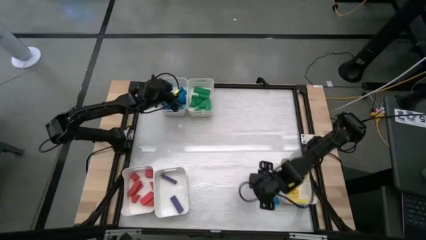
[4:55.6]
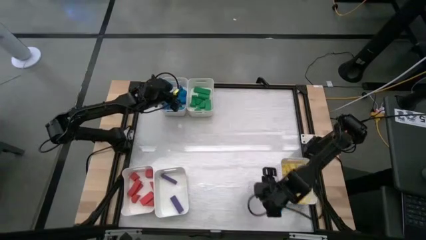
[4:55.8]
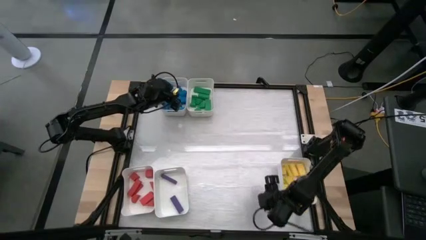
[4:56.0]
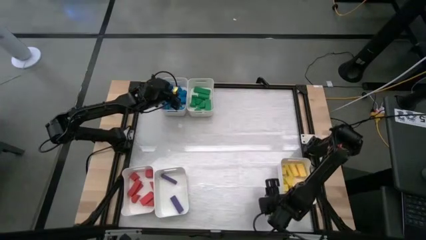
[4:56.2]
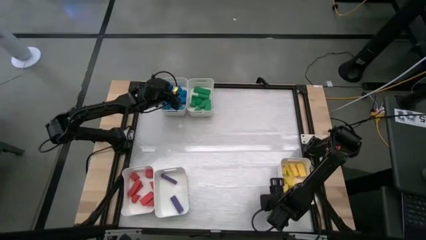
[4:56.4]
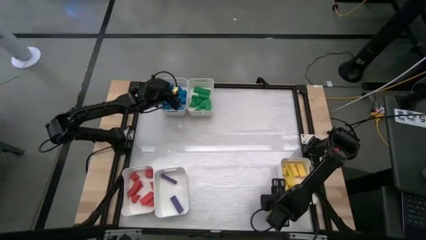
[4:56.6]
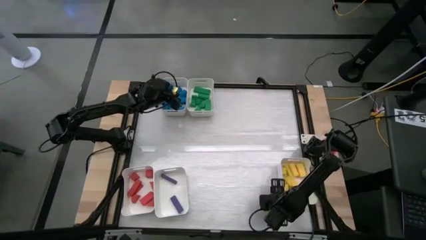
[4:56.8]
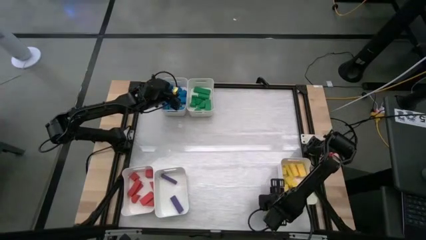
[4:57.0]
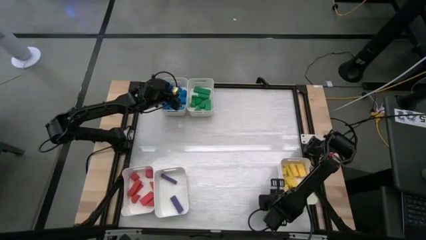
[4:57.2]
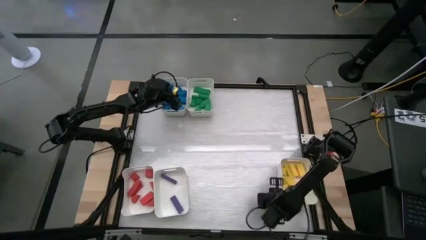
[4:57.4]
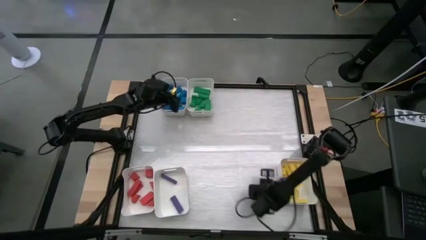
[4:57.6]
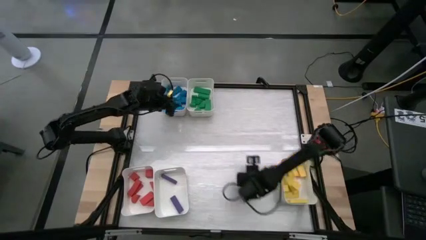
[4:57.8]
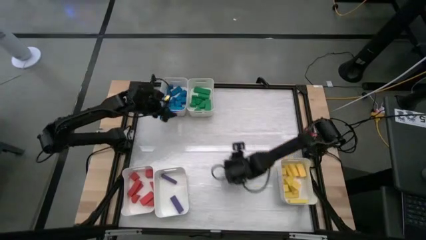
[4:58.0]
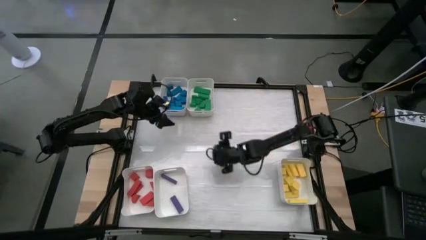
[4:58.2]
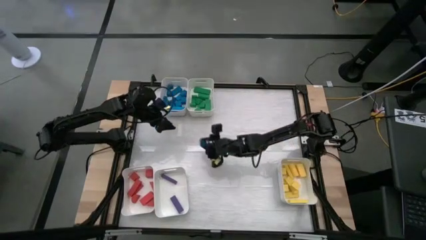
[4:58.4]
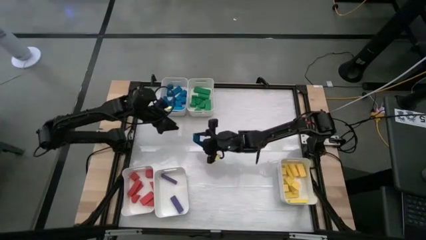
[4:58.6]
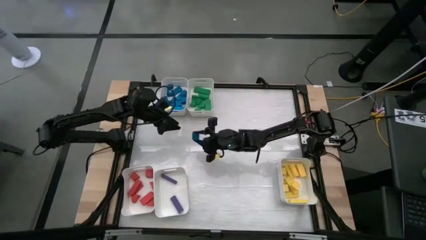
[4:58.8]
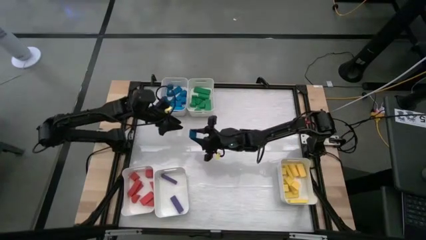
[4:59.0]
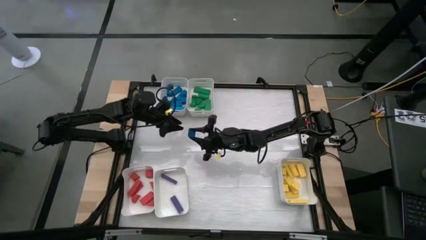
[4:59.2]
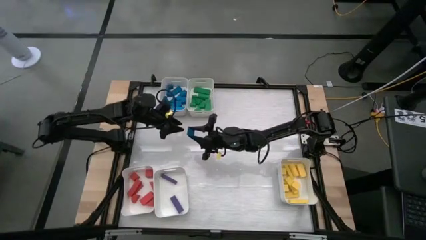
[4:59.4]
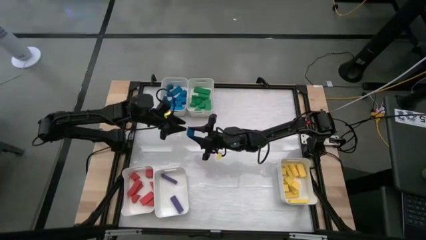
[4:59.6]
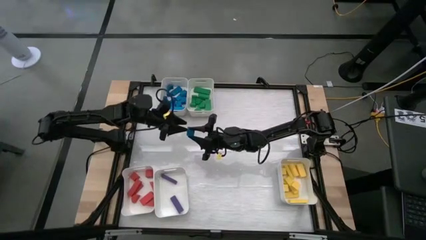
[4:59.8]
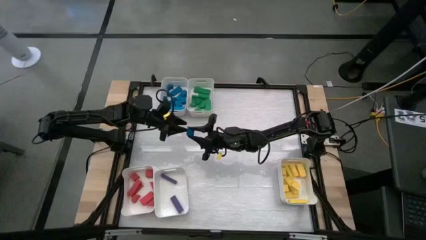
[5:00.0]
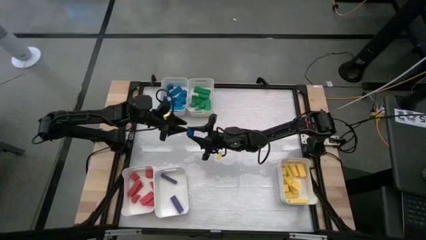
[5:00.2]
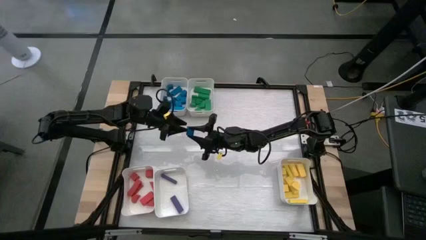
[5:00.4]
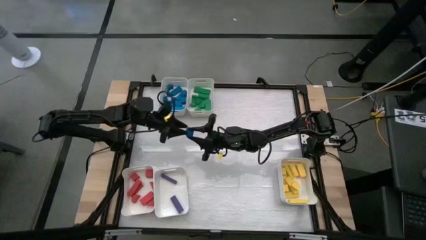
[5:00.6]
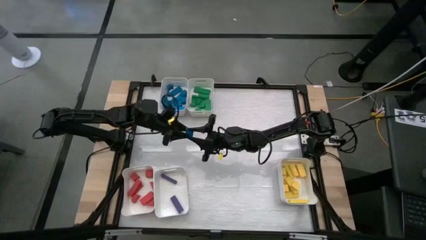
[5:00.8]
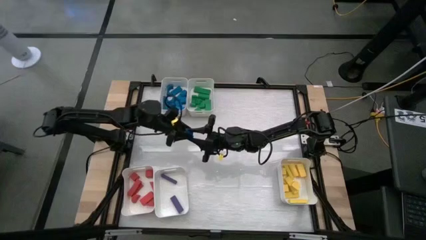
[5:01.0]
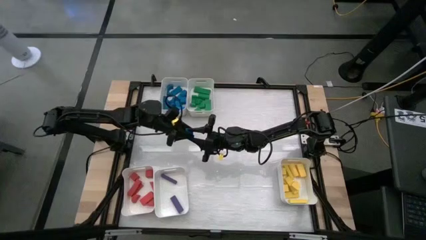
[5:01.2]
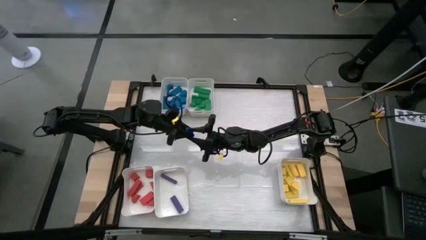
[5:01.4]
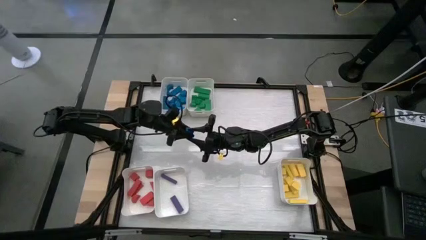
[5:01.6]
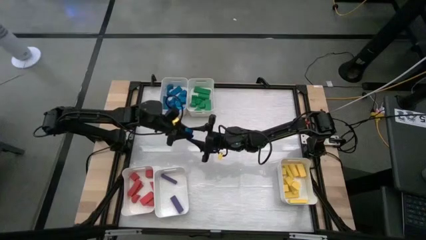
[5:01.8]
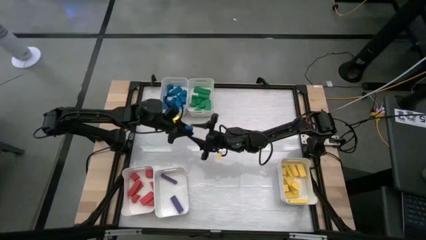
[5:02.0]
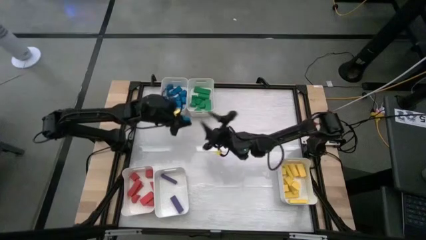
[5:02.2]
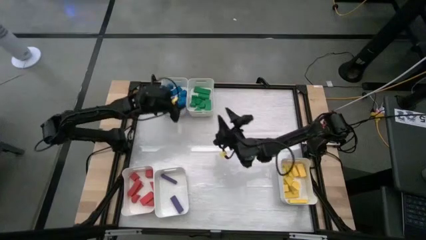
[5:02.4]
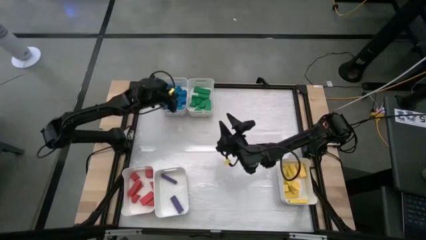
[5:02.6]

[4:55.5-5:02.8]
Task: Sort blocks
Put the blue block into the top left white bin

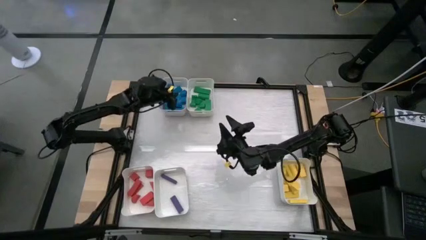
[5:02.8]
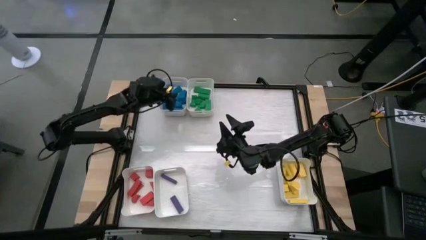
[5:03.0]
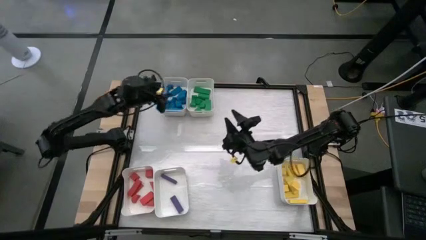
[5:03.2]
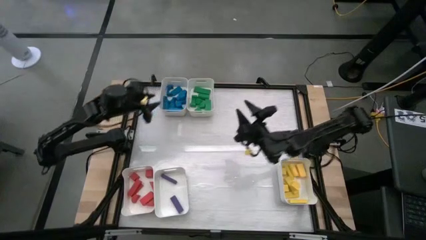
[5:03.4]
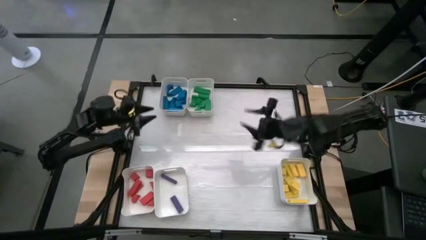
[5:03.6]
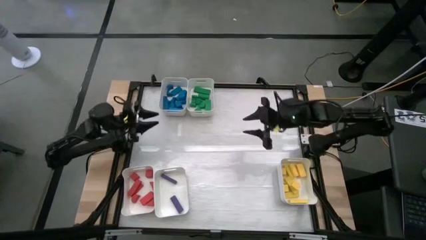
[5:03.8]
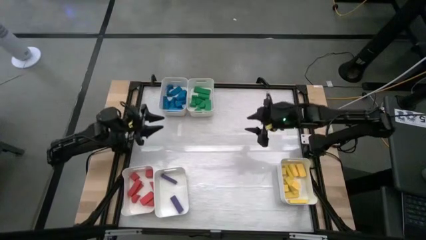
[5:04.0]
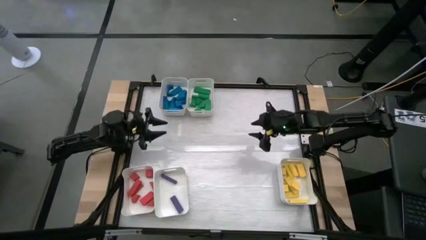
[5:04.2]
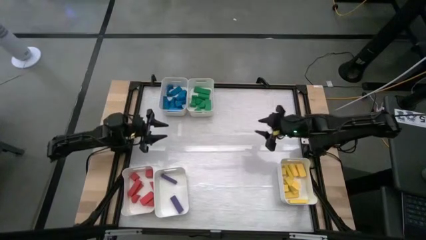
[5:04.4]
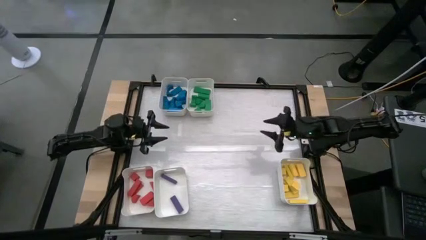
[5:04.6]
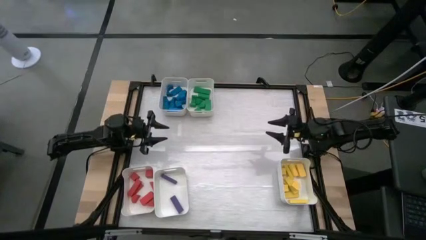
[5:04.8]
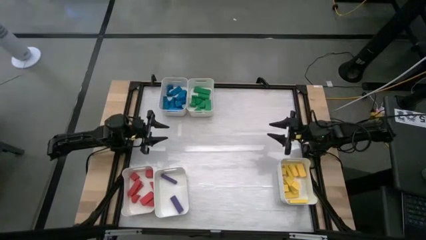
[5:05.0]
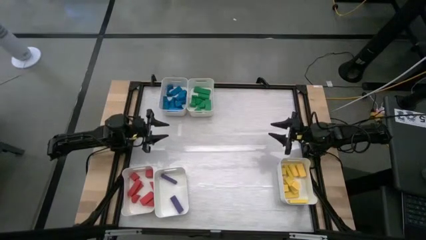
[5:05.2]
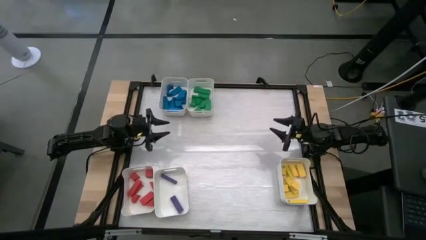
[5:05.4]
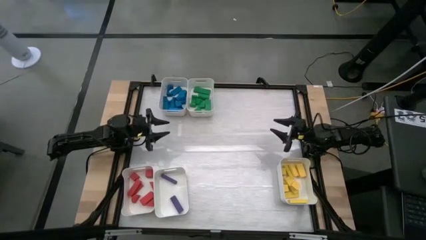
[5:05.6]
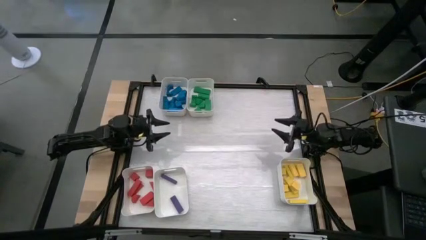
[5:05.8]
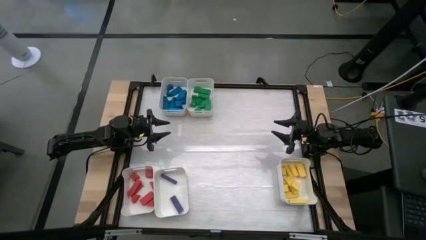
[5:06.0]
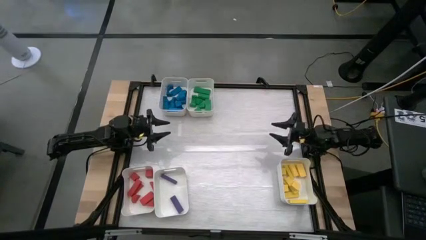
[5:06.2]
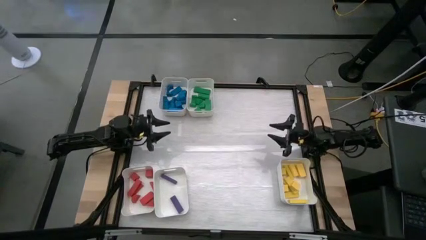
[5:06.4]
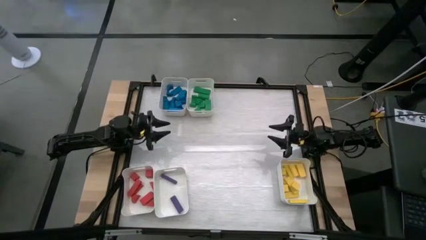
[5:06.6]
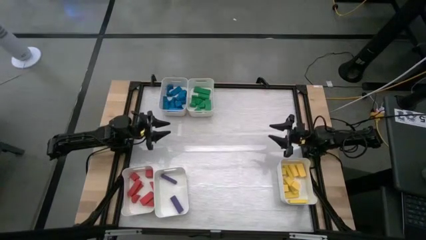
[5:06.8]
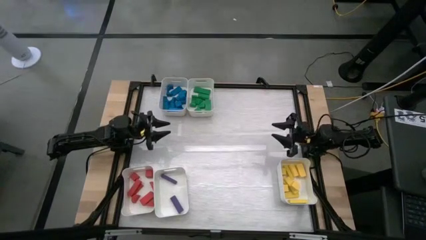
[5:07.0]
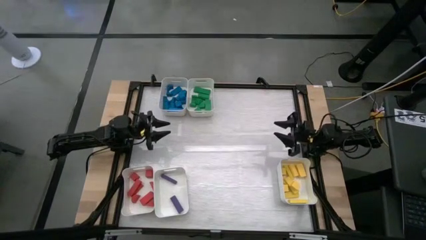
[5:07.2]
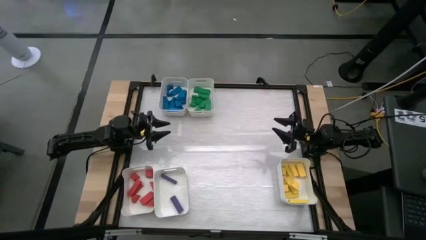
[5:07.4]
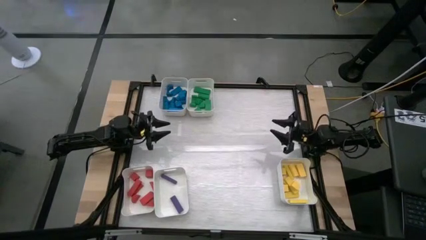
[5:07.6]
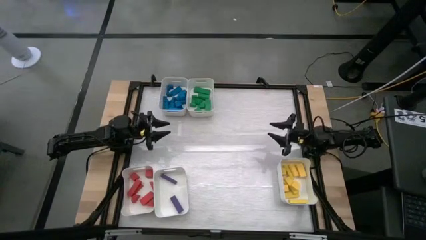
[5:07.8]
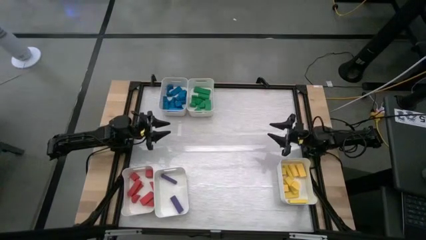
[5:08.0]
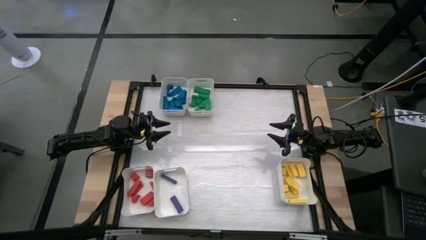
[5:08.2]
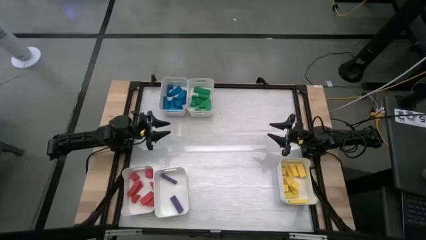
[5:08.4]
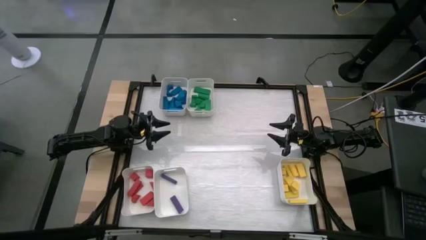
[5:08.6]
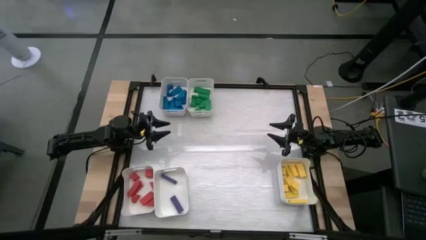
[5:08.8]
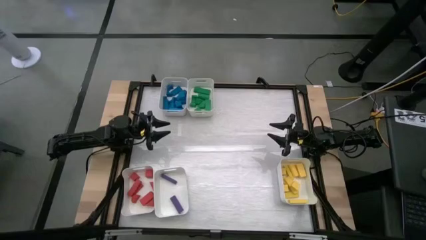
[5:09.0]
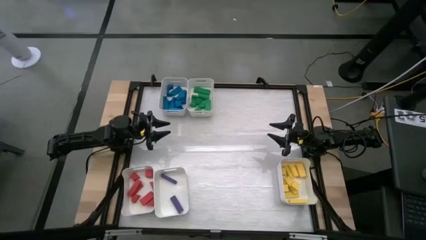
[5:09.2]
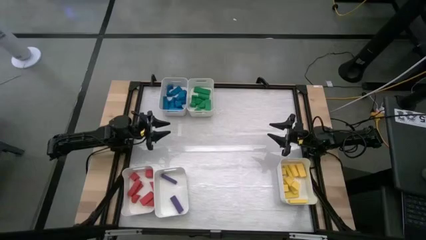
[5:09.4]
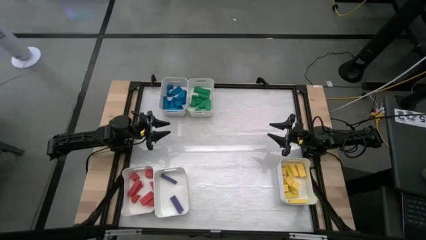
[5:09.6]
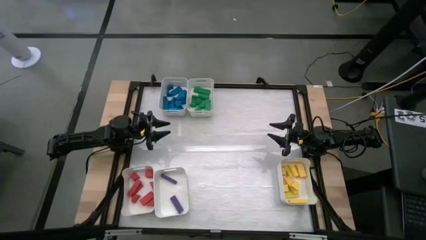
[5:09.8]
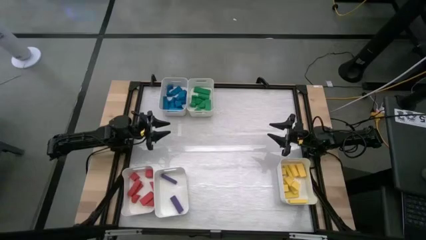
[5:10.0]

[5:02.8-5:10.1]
Return to Home Position

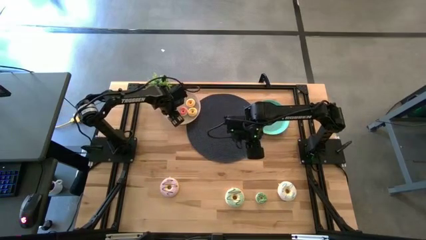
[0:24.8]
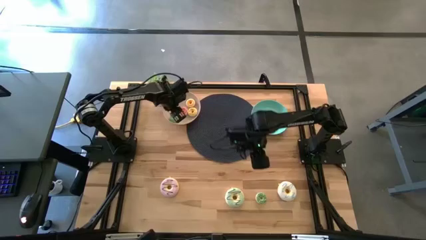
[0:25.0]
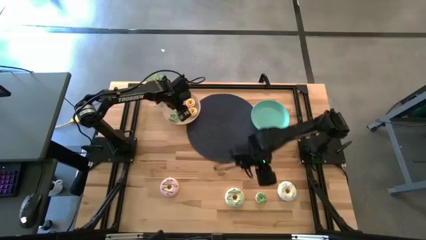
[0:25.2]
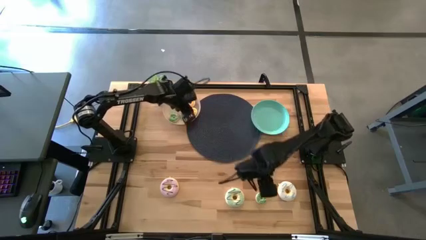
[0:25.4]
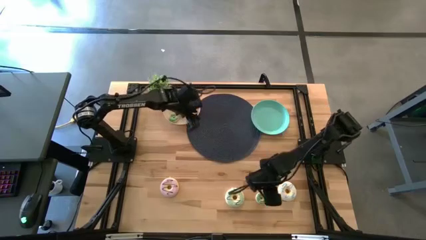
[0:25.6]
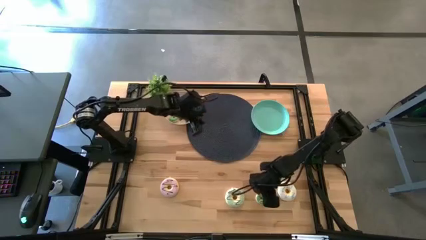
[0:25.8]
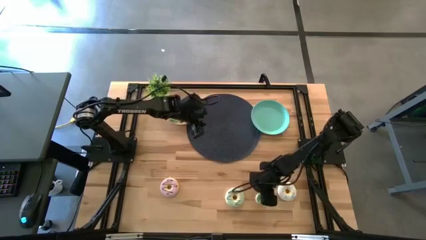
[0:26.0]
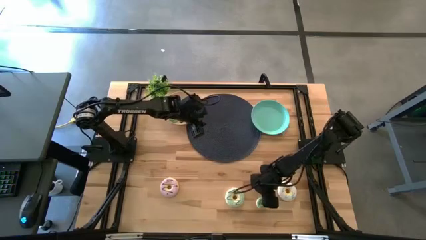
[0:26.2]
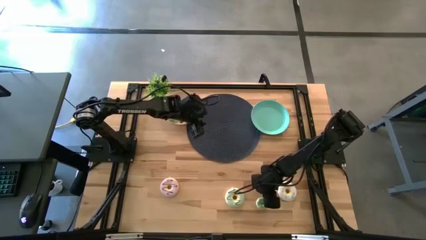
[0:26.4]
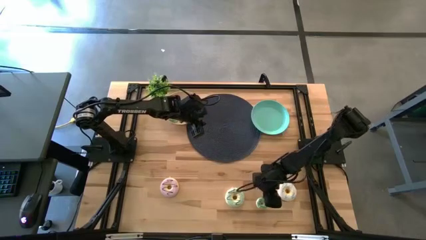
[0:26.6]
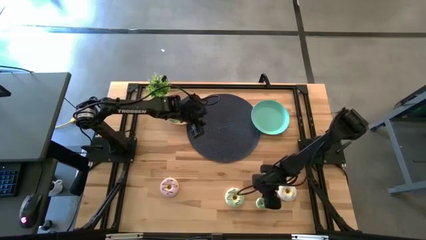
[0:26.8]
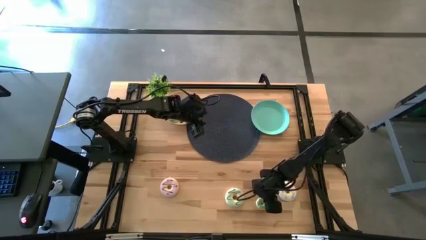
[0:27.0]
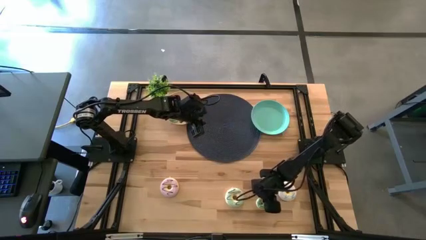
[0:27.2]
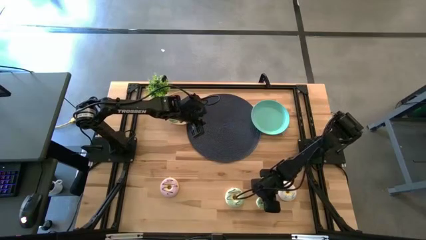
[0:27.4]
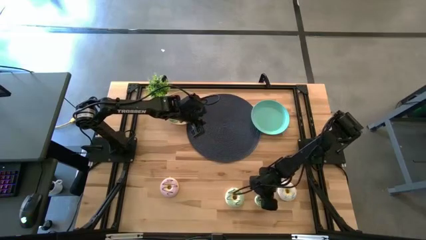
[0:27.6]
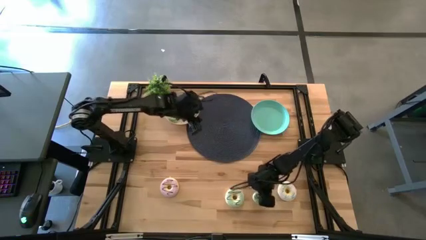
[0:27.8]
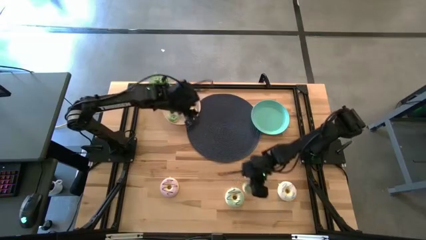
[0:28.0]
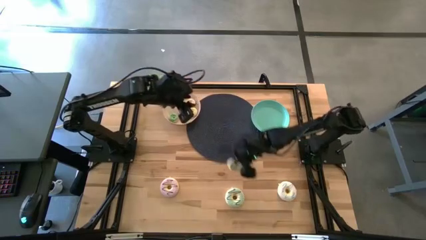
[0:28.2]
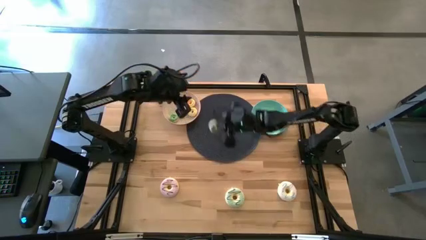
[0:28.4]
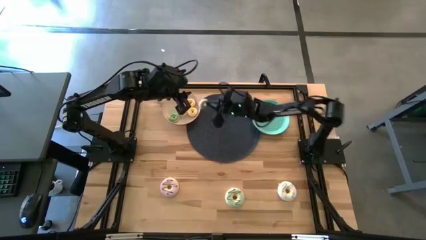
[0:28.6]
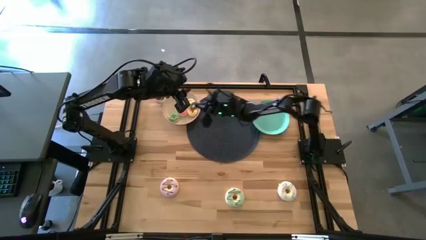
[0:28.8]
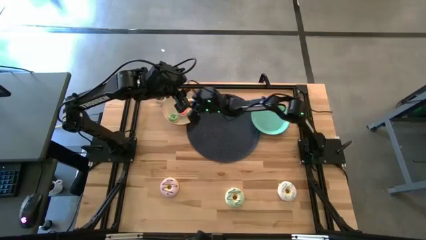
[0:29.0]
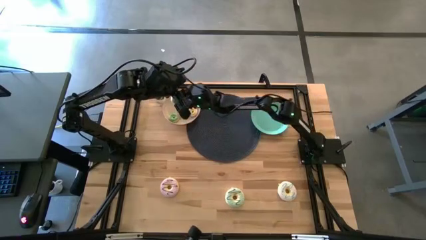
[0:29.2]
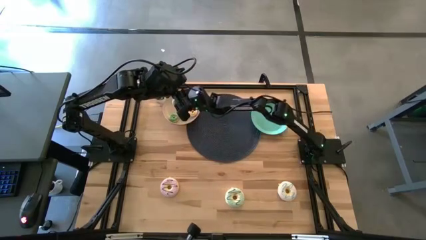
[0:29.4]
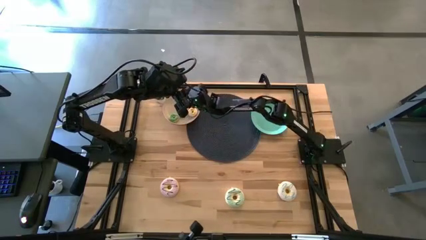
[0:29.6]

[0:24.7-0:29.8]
Task: Pick & Place donuts
Put the small green donut on the white plate
